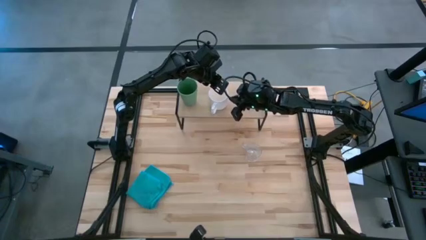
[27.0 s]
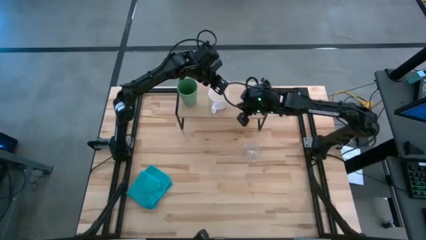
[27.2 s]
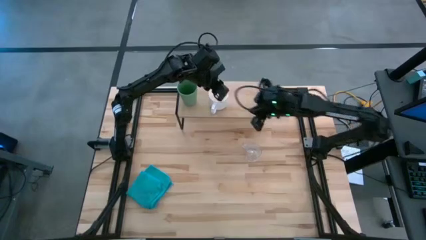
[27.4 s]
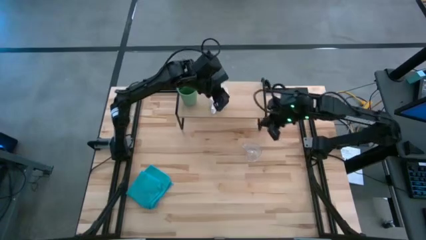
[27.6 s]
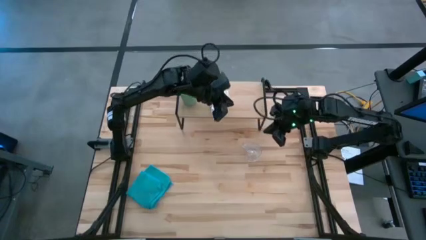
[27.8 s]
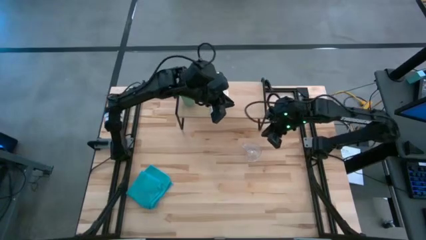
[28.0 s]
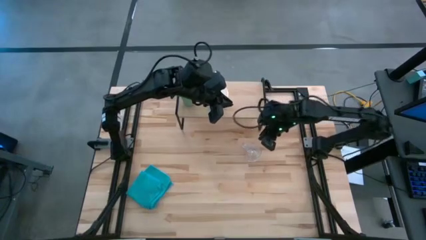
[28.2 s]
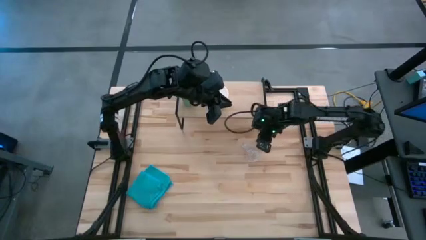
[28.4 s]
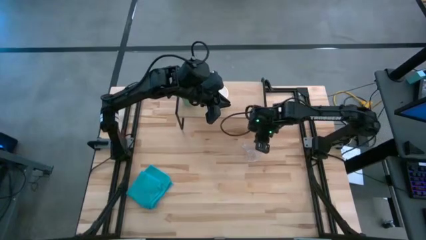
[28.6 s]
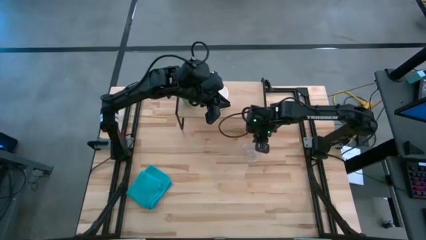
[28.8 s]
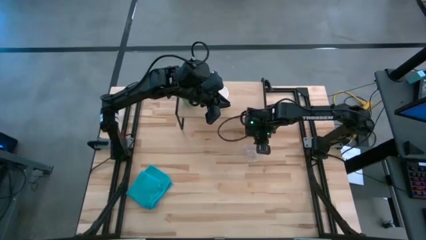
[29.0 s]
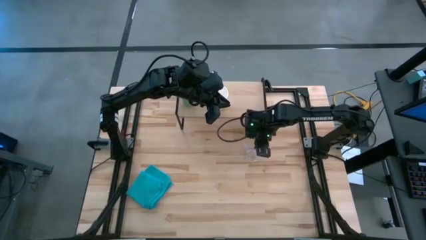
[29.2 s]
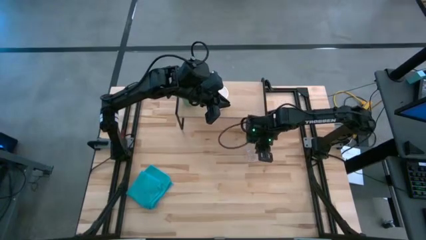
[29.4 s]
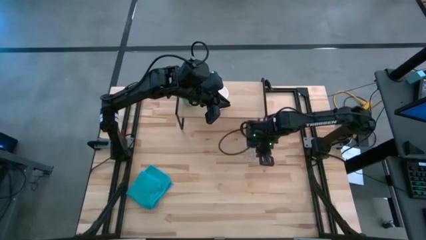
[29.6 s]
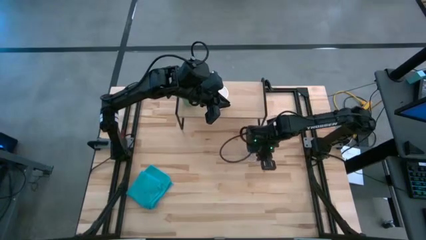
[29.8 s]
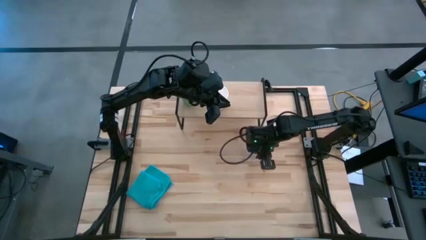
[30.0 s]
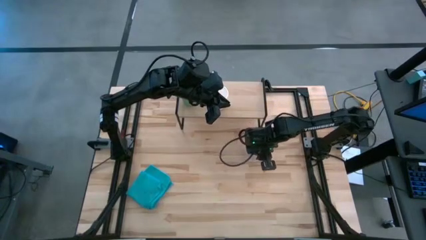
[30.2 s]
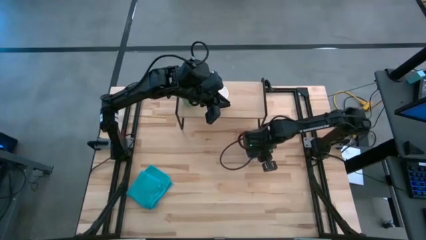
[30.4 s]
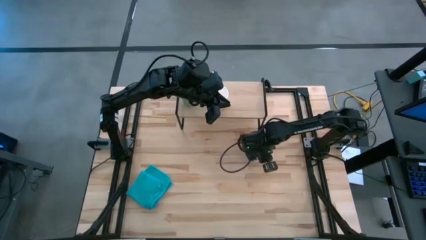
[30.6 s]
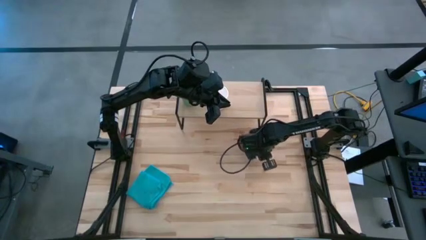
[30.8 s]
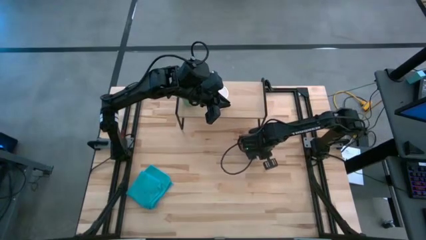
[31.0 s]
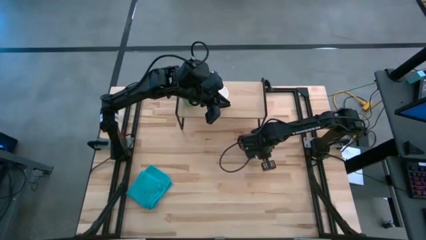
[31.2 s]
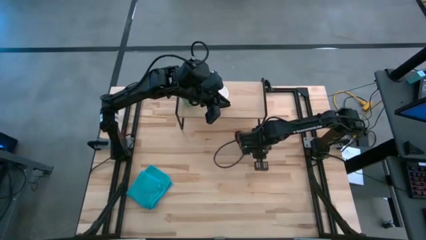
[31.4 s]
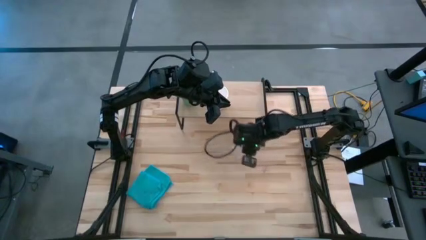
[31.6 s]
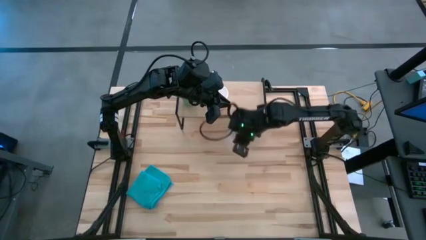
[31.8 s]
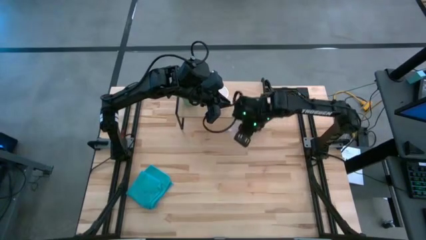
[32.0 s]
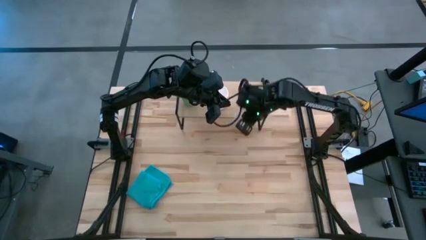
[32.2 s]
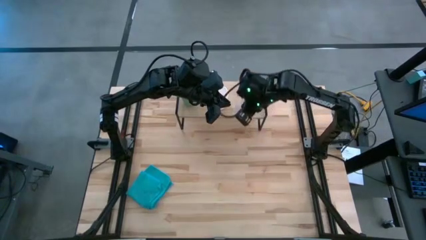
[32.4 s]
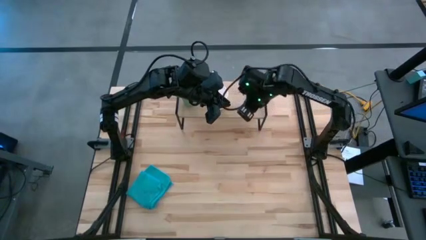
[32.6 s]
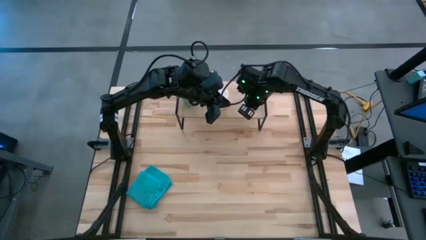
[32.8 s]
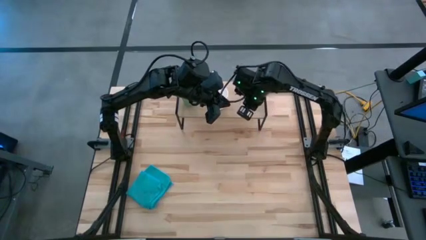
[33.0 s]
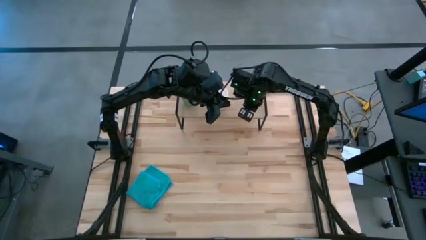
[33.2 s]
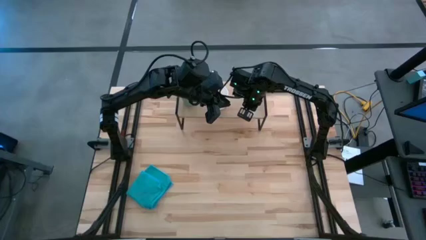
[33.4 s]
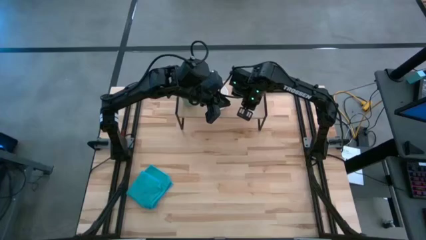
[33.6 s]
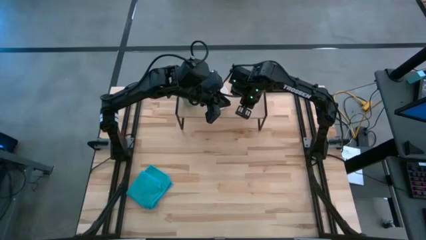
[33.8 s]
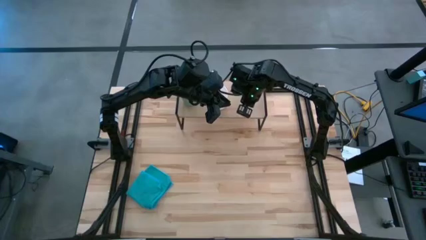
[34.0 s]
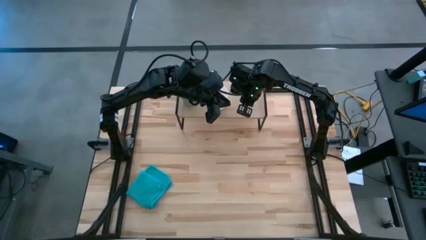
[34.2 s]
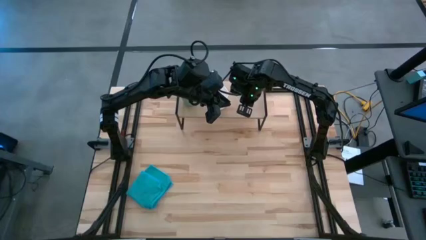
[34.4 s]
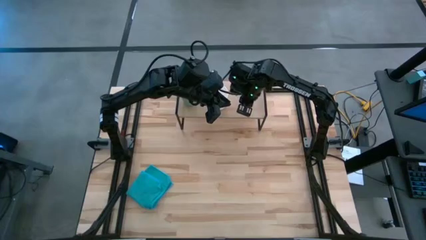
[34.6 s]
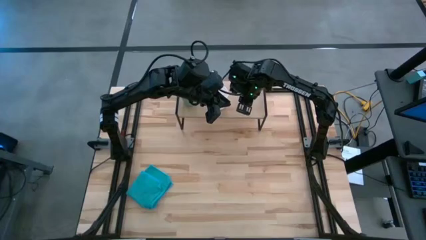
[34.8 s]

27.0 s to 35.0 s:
Task: Stack small to large cups/mugs on shelf
Put the transparent cup on the shelf

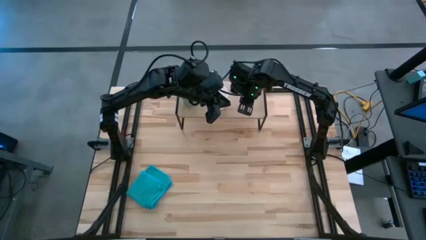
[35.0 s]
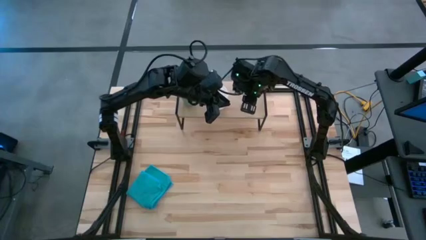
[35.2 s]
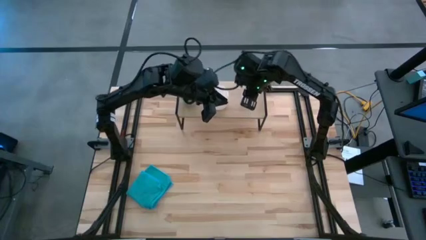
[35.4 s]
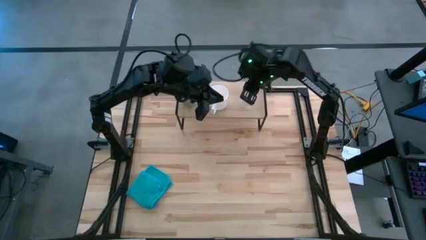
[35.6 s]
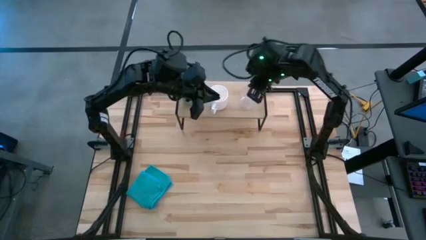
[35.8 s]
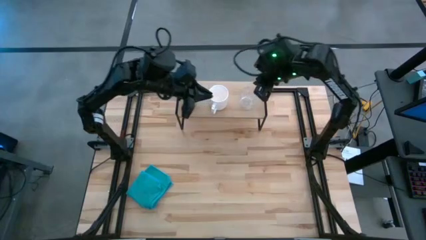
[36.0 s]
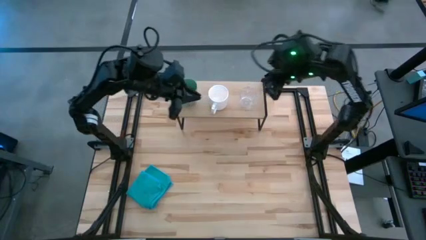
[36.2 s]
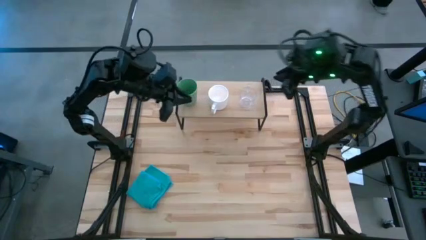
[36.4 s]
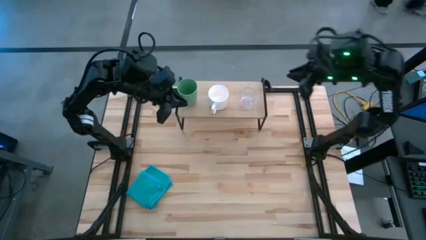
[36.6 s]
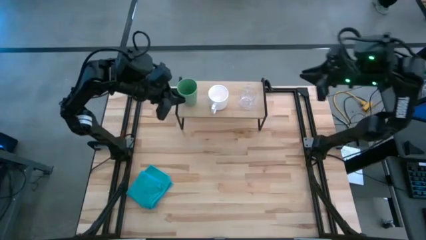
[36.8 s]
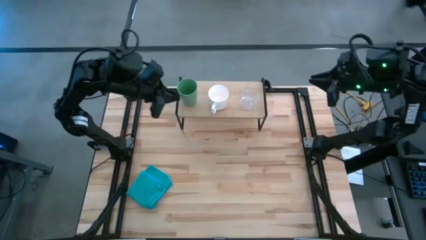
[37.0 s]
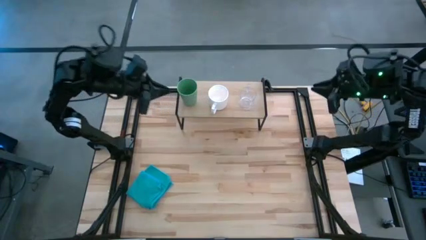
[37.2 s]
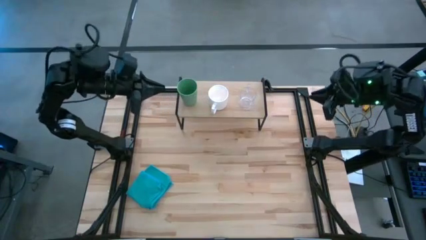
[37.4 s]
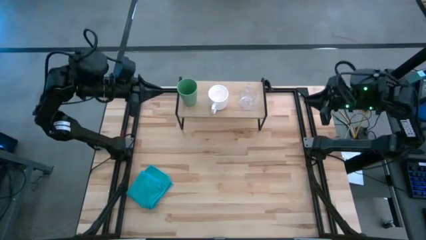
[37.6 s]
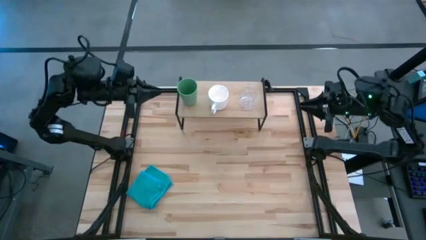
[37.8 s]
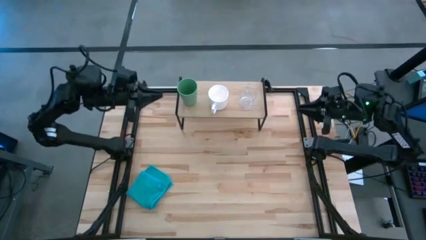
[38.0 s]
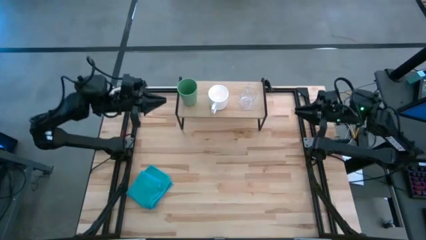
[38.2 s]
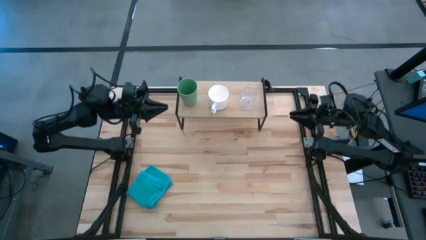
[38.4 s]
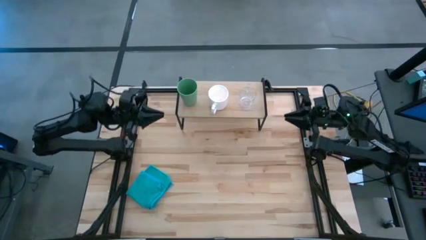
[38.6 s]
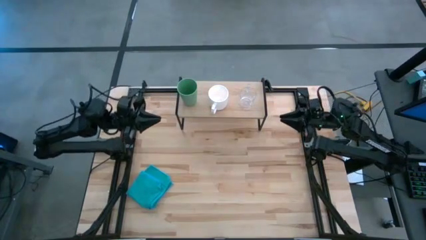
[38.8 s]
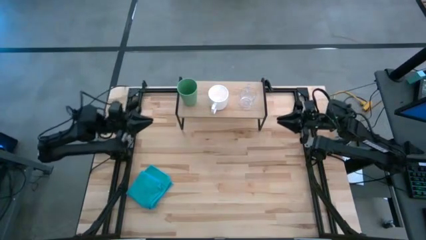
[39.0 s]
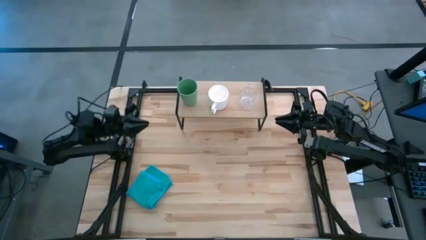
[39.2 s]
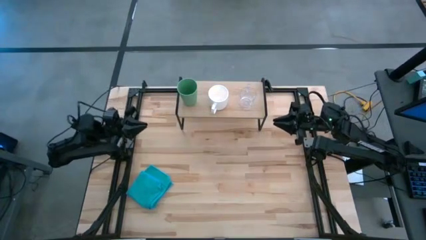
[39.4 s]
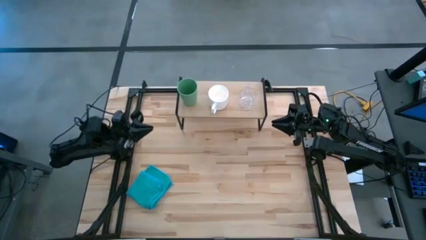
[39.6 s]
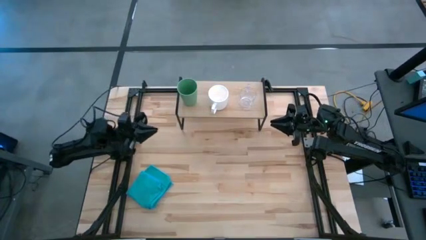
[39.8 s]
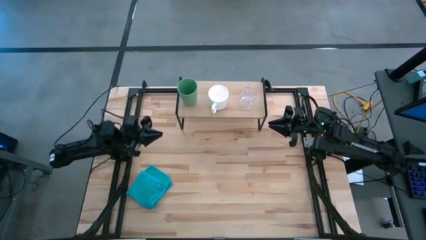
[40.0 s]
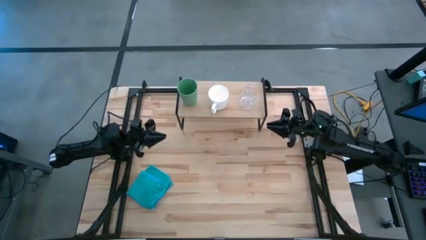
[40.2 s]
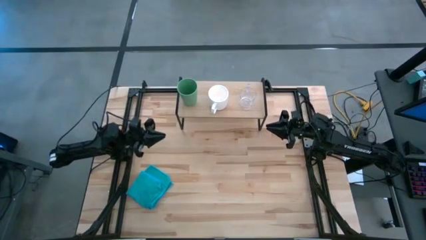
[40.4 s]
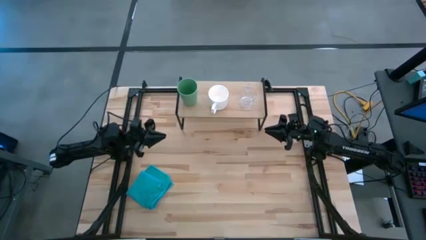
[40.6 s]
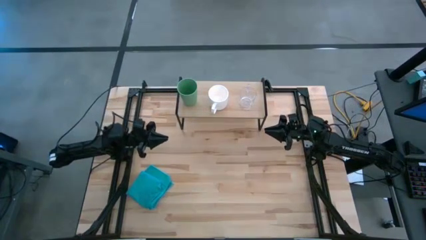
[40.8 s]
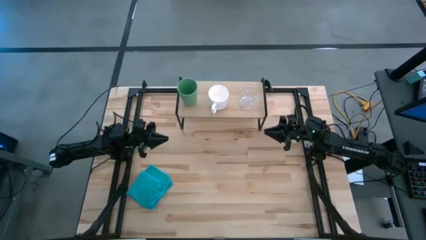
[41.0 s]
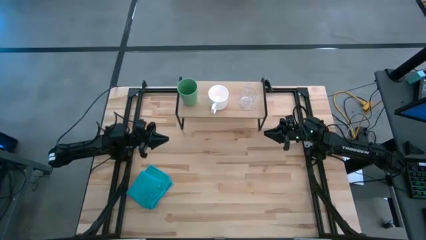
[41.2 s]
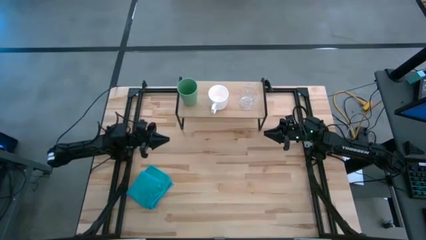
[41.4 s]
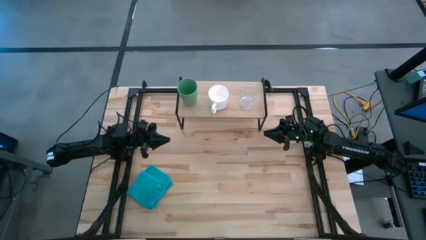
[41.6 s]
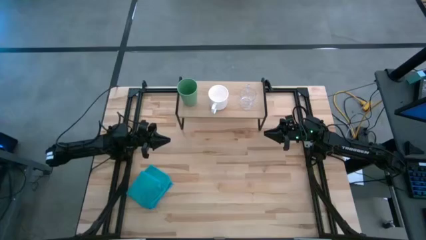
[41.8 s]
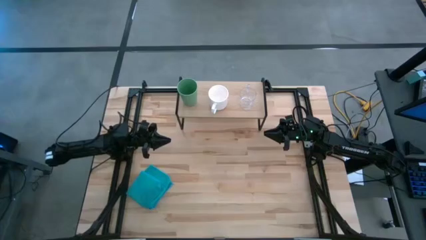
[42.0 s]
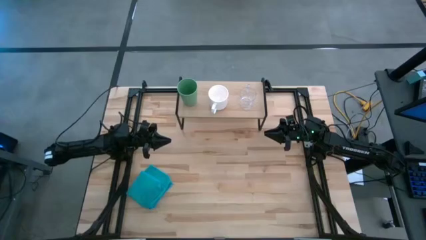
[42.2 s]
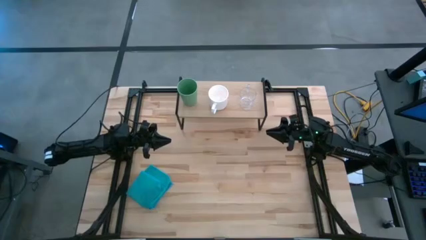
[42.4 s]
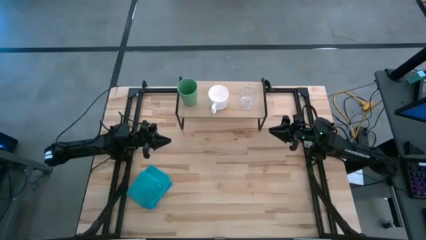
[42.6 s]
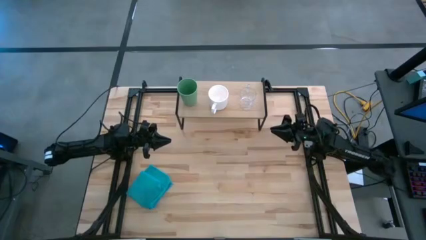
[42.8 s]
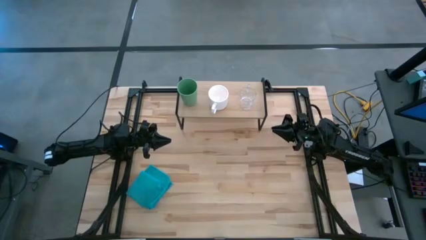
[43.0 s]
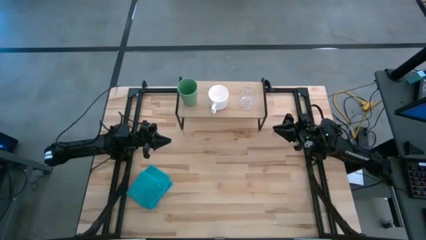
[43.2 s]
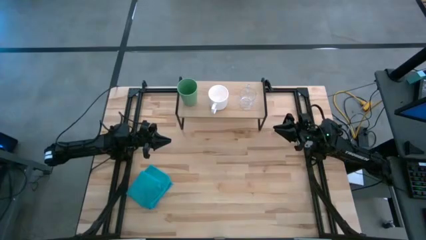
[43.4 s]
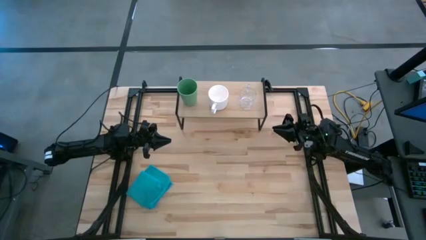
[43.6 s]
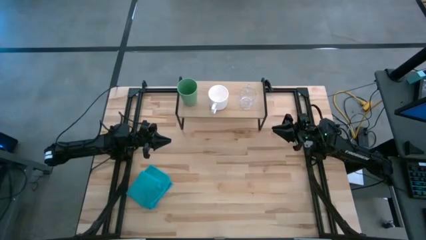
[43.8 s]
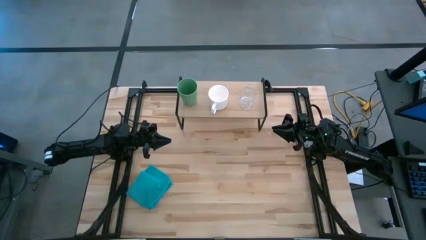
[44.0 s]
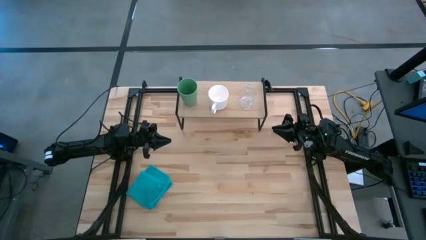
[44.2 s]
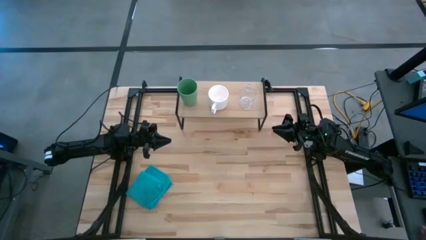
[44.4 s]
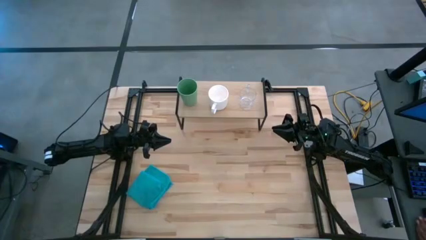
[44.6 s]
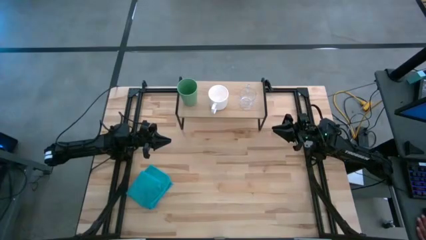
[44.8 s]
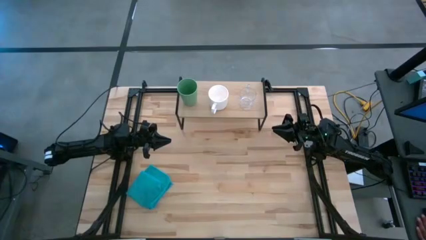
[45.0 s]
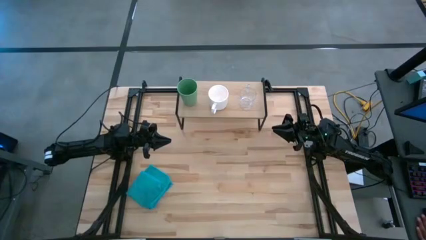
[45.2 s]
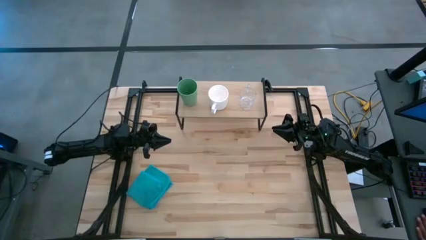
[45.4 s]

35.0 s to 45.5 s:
Return to Home Position
